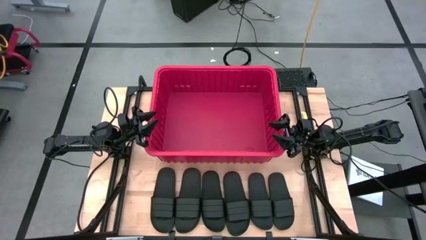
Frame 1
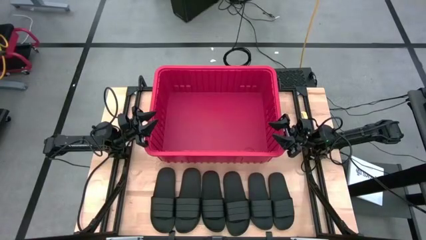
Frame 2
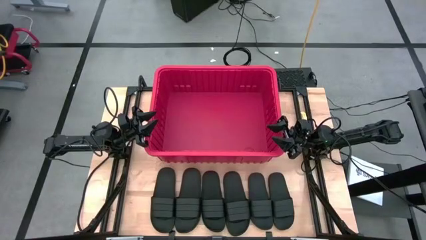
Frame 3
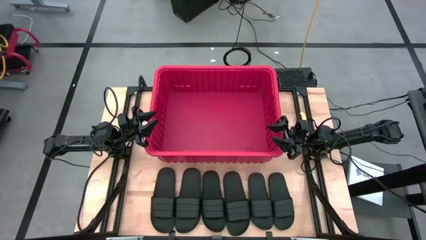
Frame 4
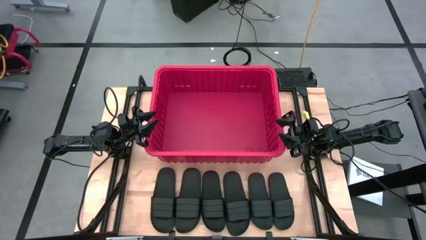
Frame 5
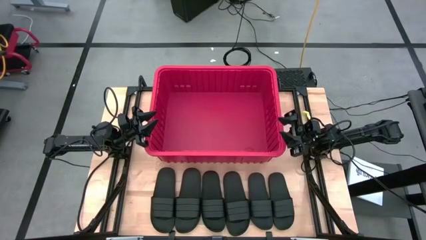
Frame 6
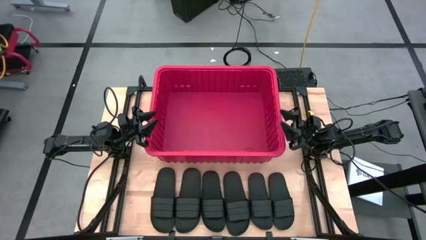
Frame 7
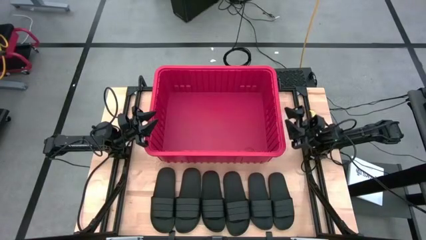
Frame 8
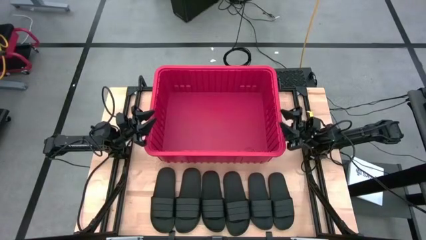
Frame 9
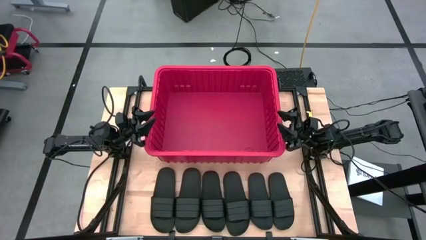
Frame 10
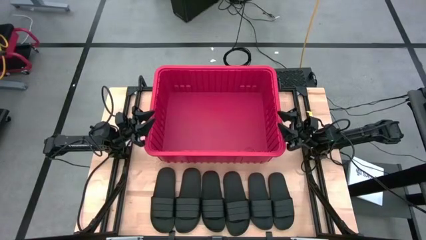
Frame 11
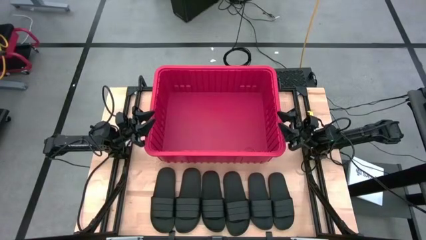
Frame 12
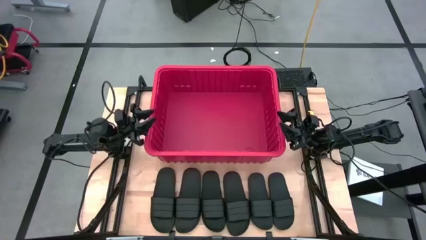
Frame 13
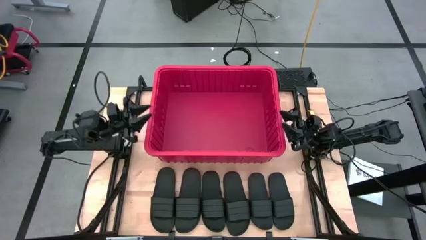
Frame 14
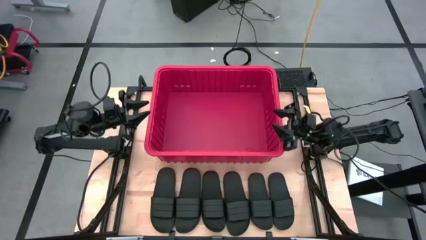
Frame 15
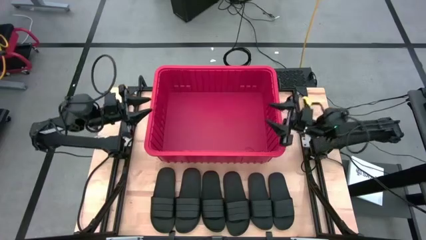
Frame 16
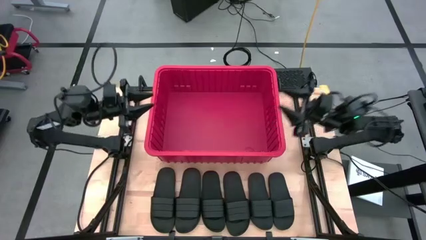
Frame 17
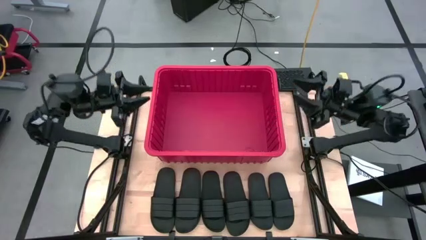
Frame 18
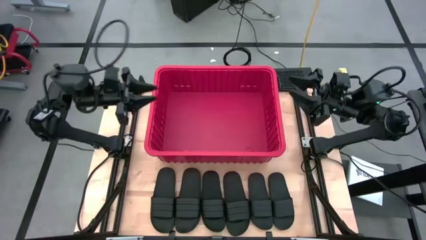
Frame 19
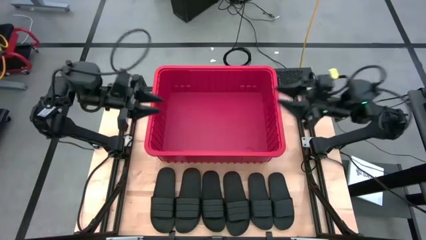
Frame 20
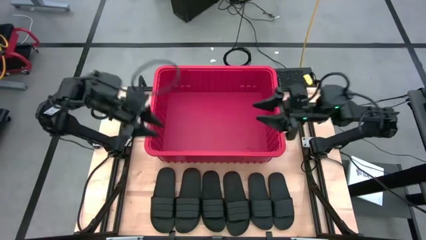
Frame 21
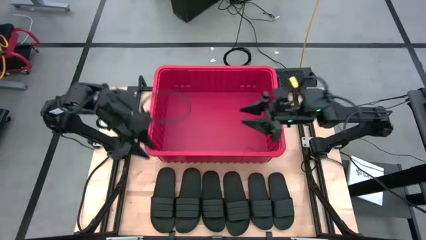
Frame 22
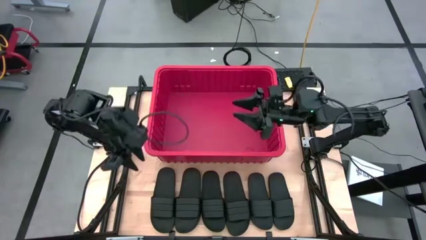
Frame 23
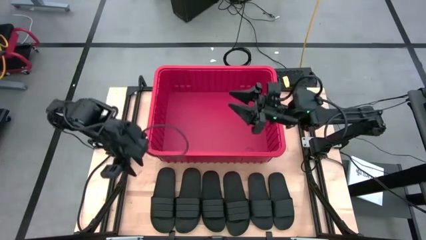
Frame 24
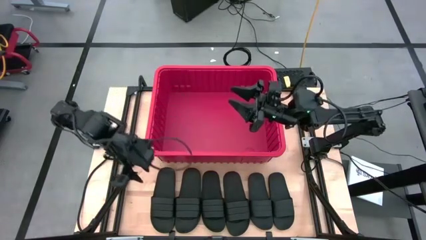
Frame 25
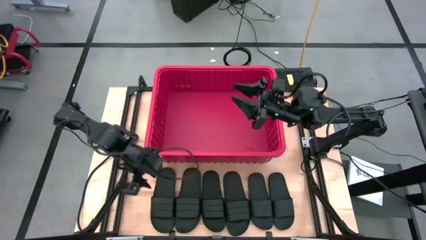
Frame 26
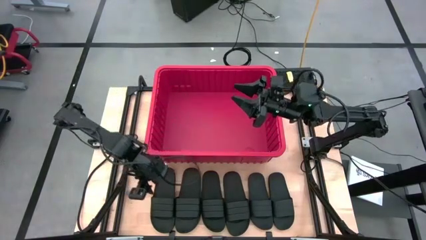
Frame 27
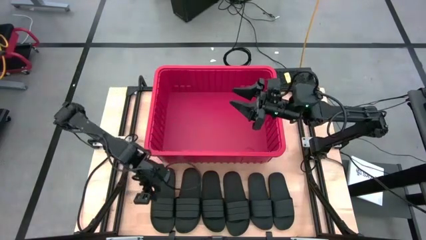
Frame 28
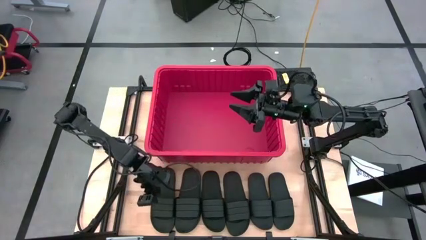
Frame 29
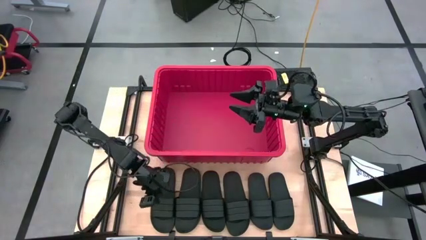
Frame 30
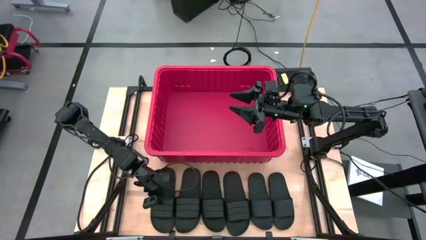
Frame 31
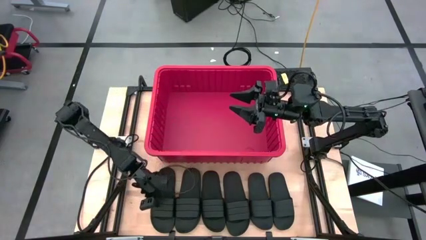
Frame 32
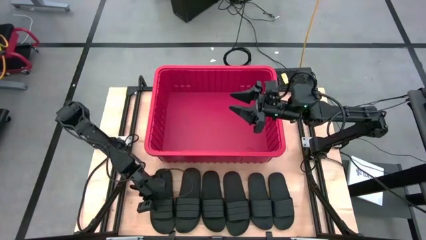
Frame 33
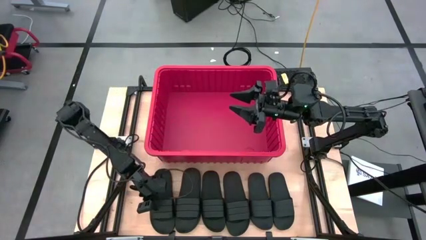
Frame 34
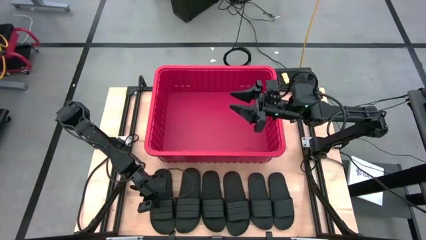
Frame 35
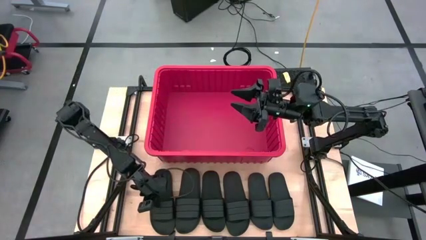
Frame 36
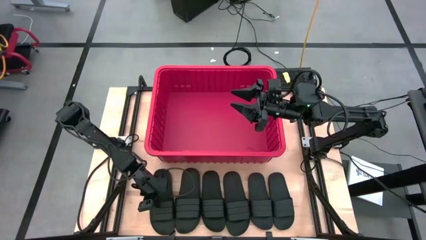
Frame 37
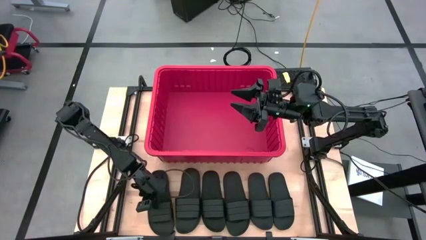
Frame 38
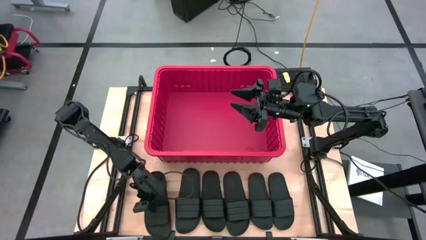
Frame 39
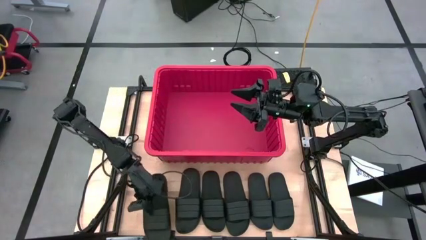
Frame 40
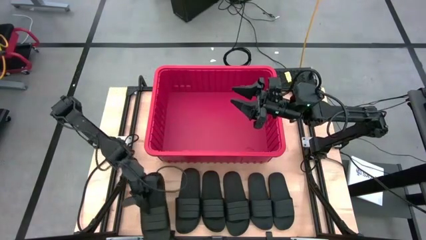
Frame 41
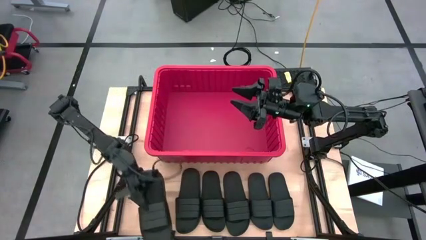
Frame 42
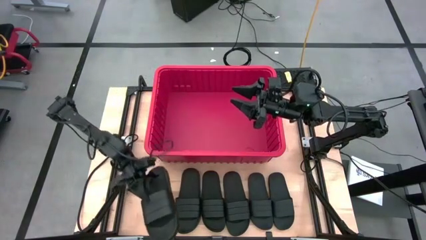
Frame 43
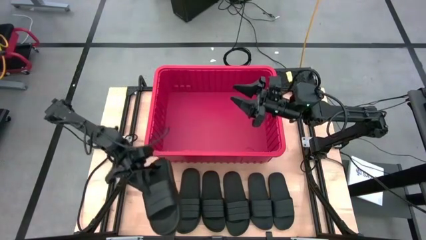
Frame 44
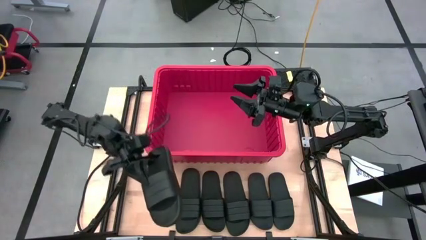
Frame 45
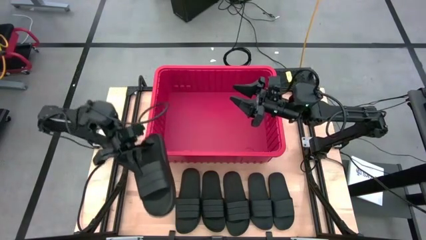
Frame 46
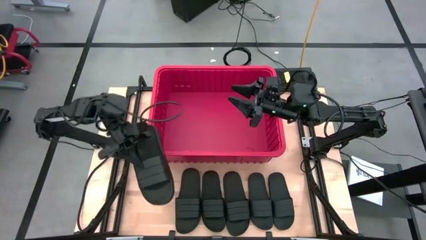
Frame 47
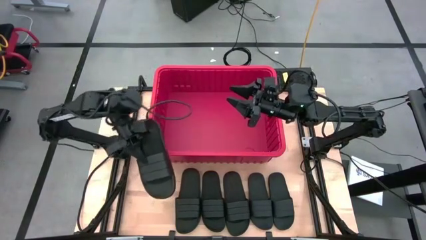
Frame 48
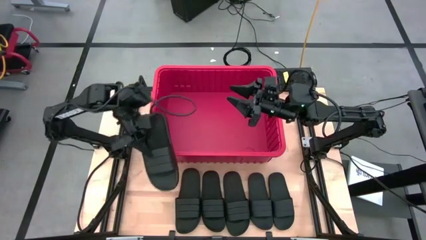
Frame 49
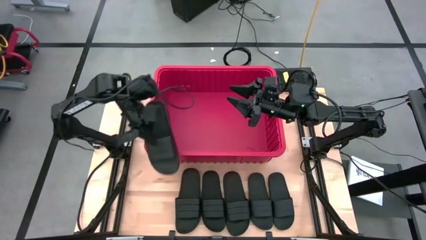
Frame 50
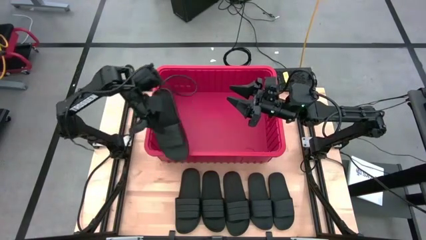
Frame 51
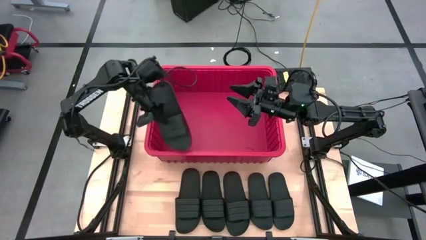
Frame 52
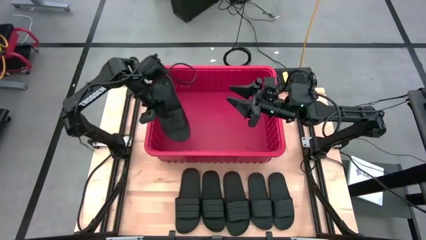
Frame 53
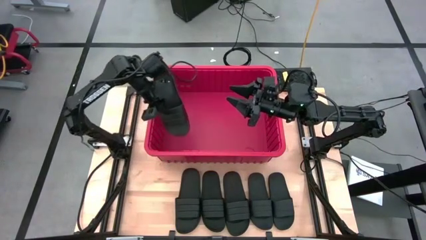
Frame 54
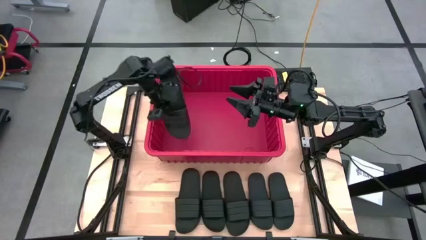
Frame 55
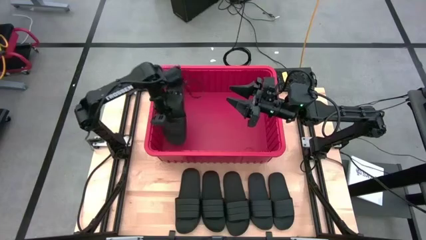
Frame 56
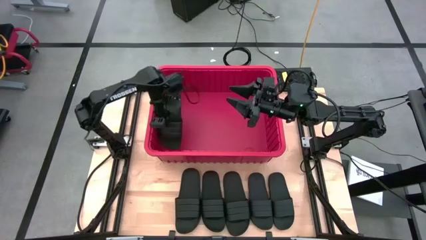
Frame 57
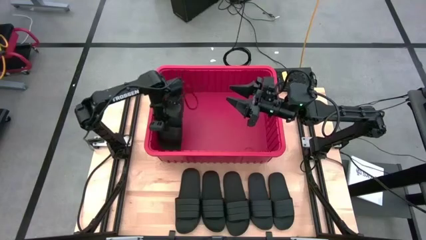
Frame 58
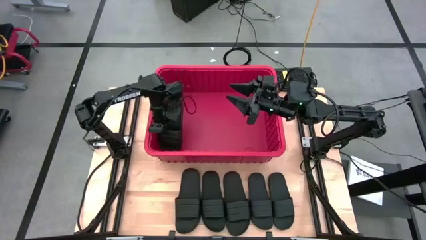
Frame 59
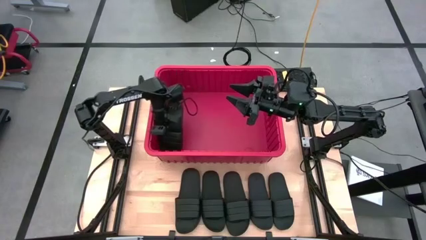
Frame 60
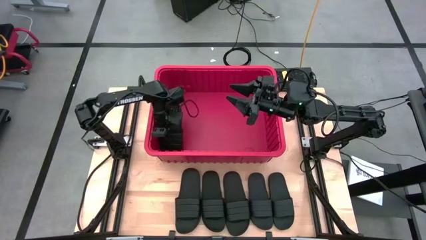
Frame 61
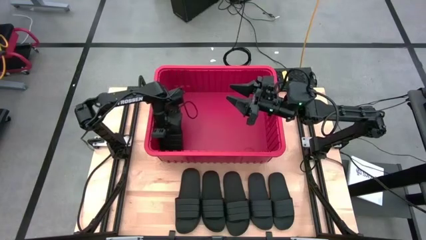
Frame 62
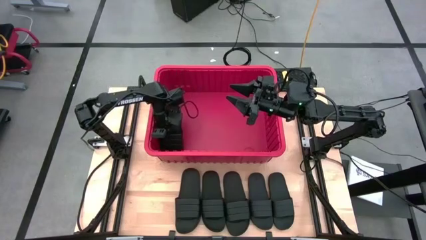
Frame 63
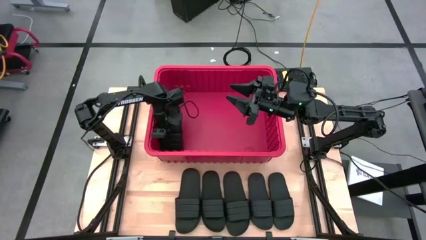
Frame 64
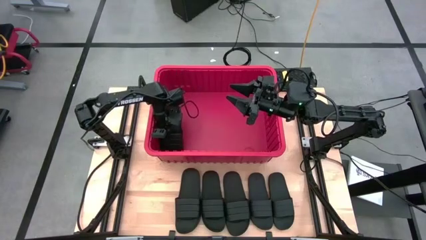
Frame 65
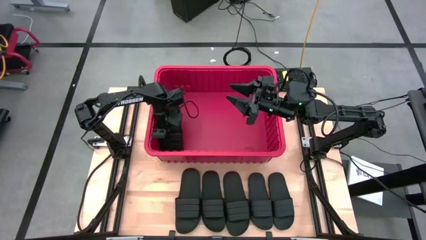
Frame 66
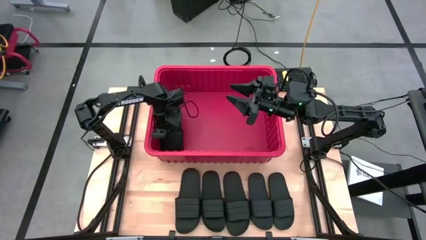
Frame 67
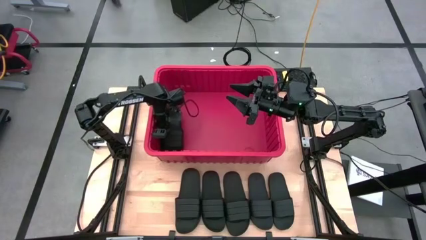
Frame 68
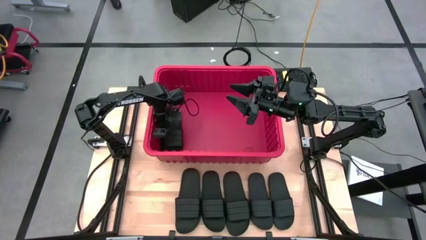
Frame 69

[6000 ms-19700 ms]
Task: Pick and place slides into bin
Put the black slide into the red bin
